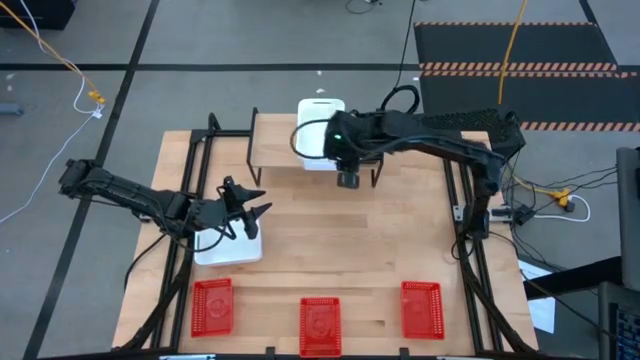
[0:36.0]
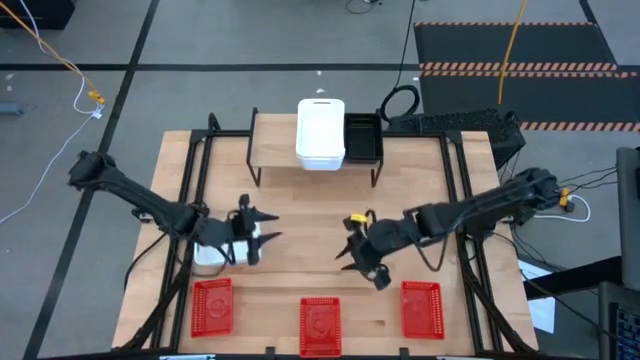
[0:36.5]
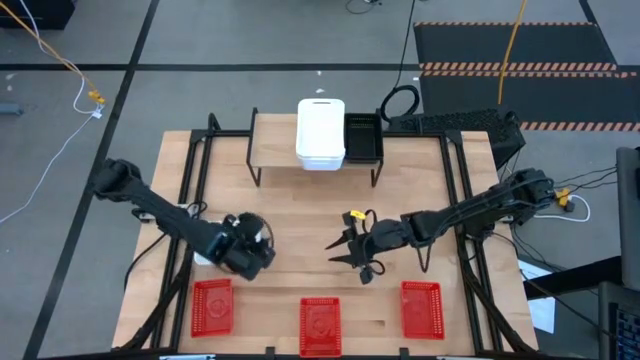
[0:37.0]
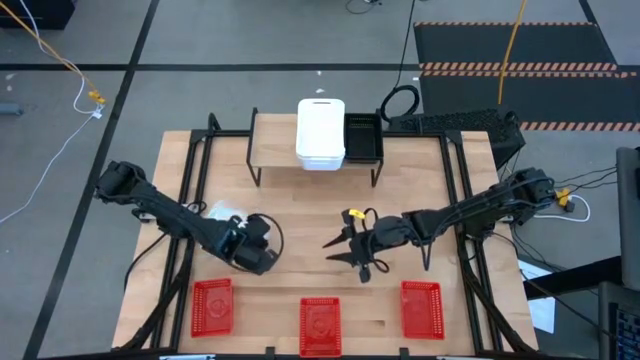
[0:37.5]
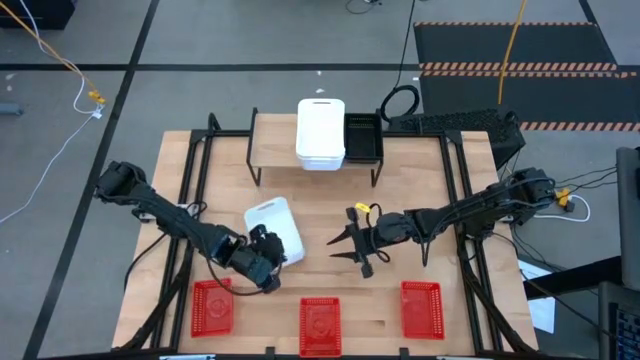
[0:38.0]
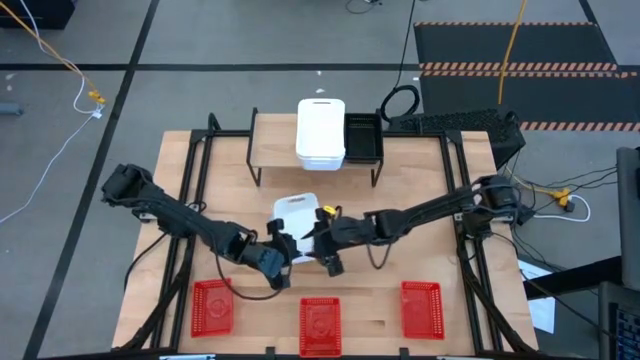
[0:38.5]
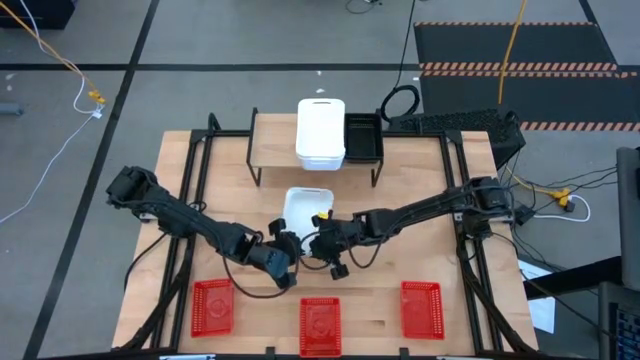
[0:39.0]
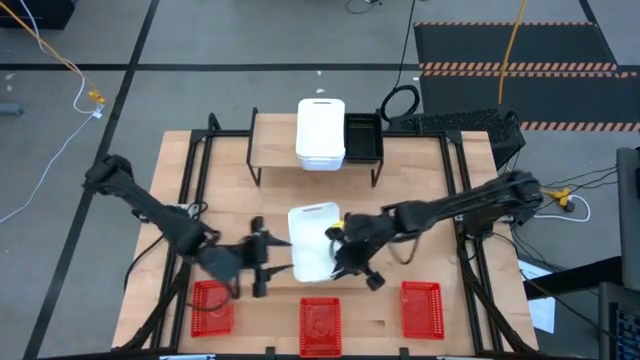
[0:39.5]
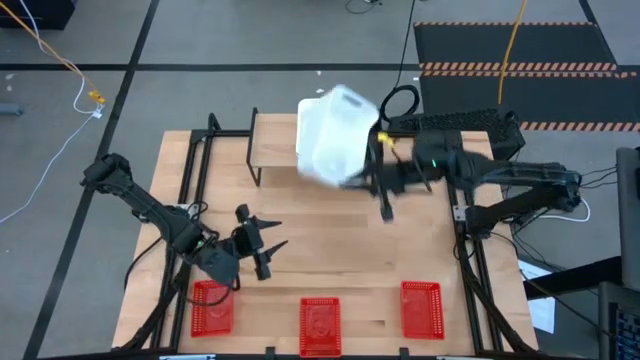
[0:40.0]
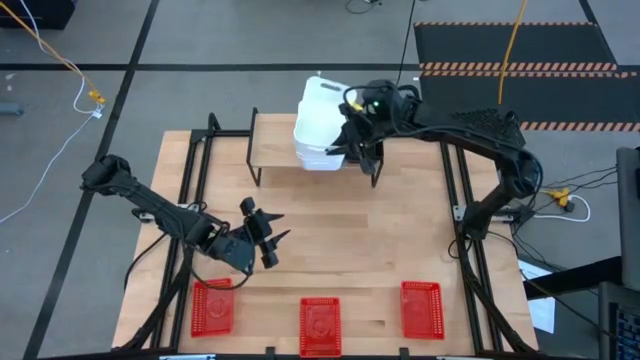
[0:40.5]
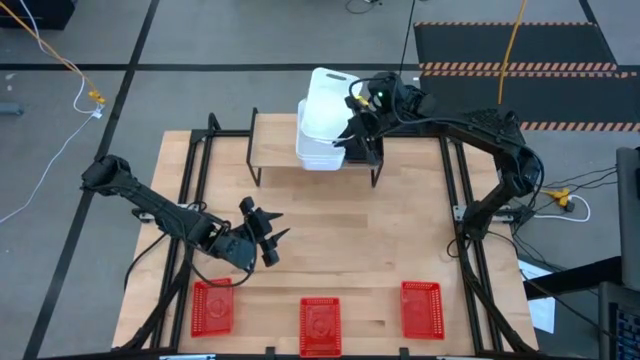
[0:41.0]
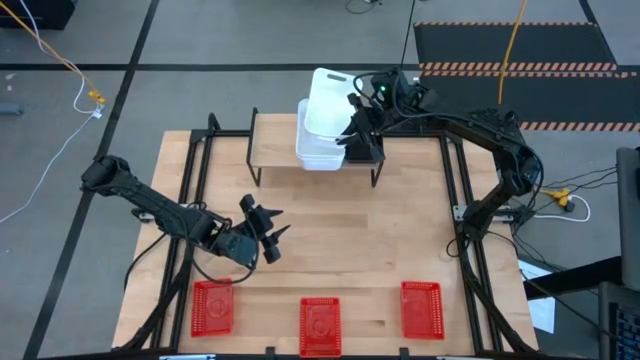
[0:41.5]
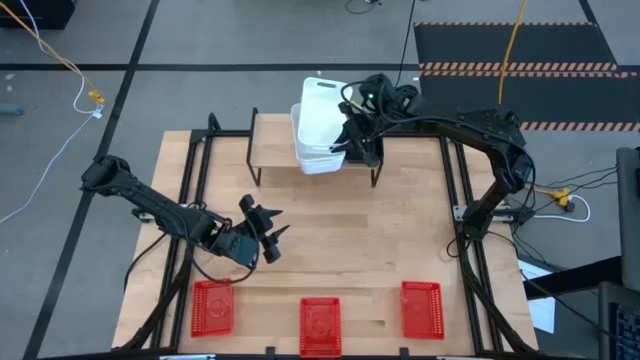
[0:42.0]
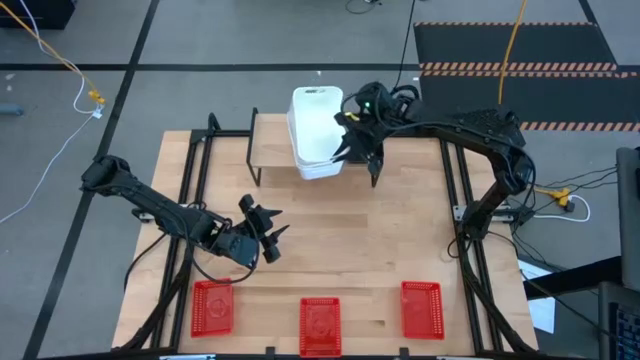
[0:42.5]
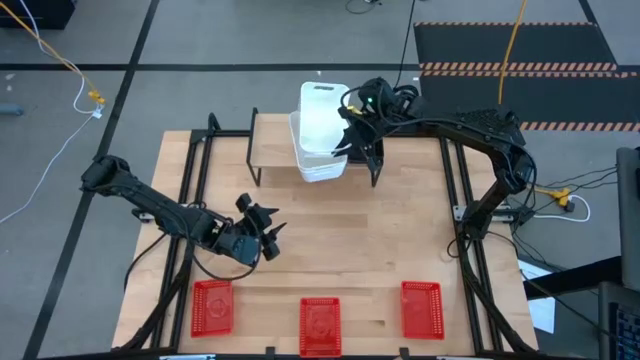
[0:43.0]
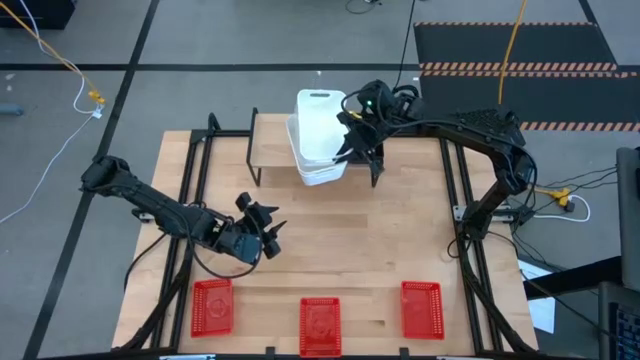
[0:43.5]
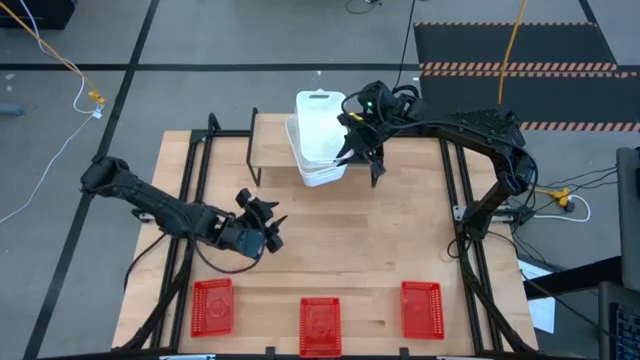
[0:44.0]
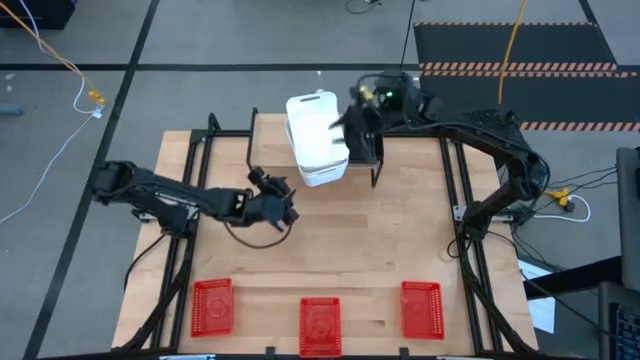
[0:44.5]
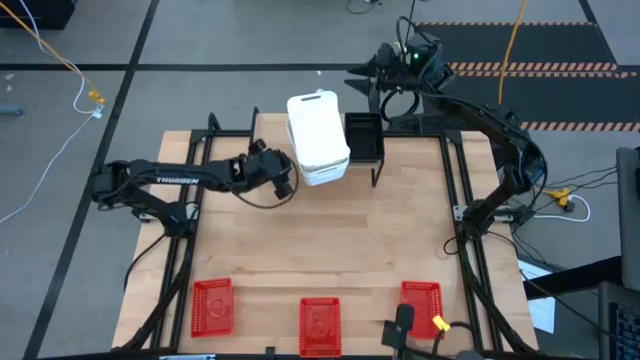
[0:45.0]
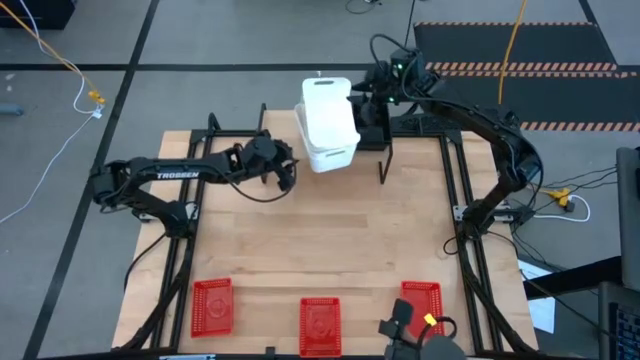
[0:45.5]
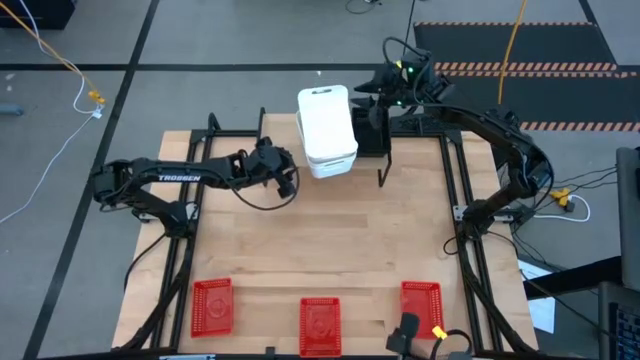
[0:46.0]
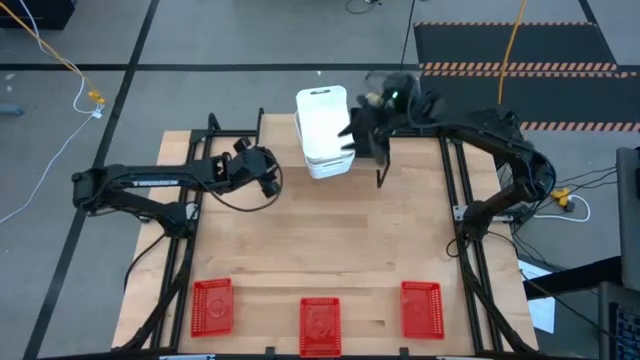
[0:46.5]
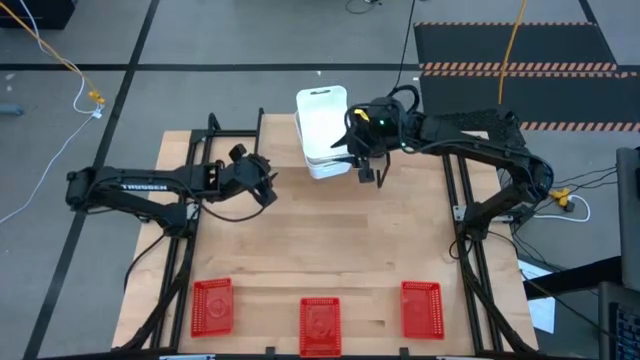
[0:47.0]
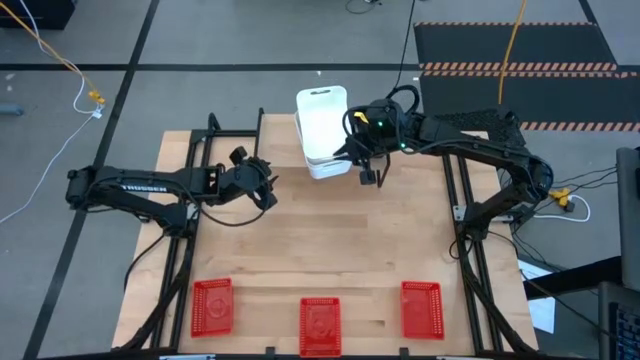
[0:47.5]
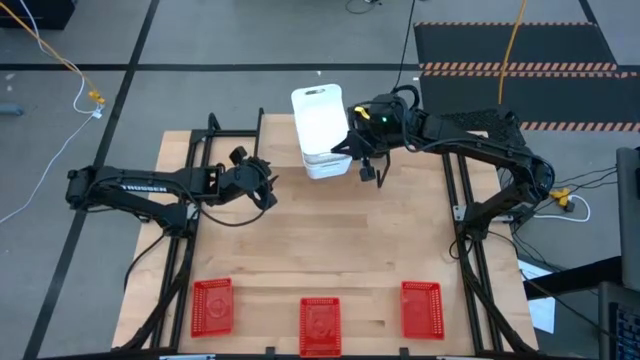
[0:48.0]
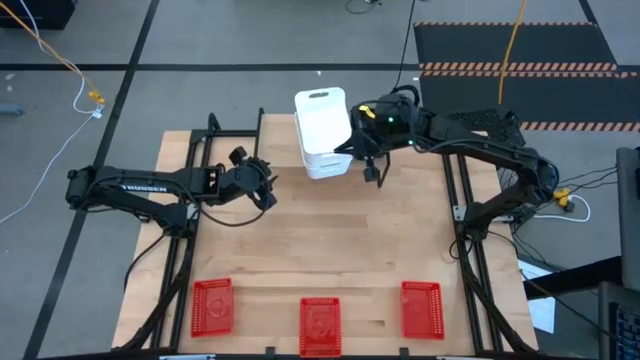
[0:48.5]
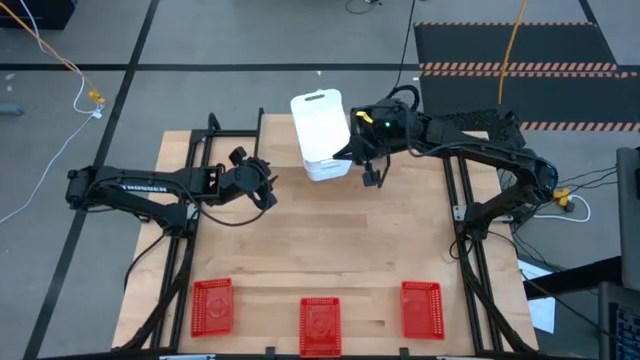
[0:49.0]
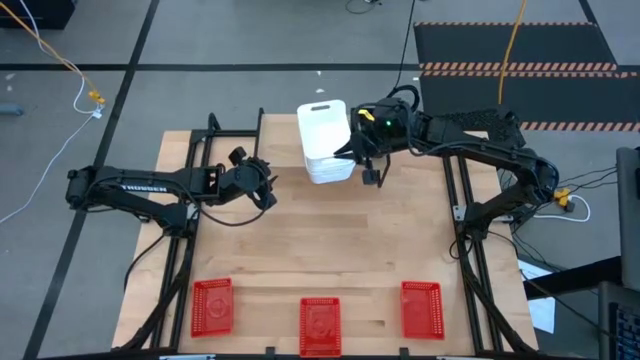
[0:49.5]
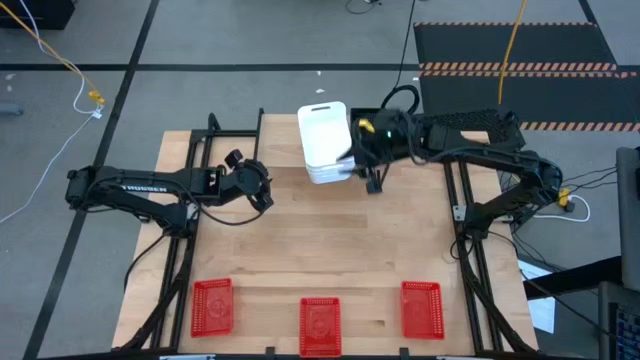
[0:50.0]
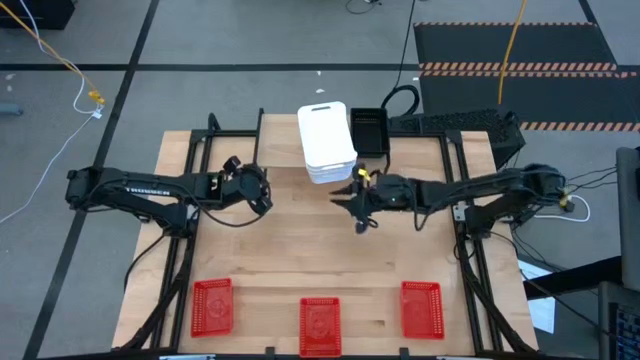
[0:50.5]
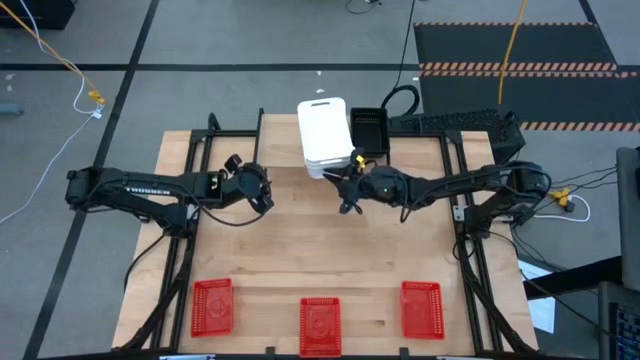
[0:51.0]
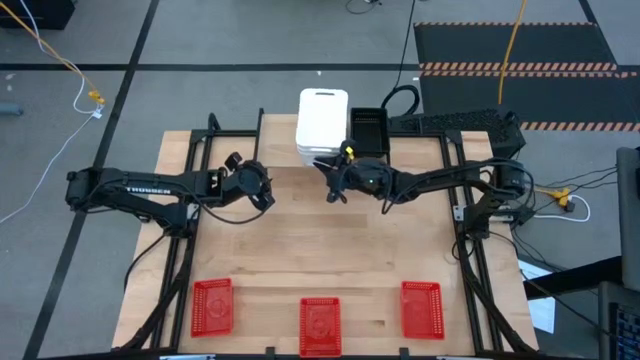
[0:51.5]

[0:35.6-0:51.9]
Task: Stack baskets on shelf by color
Stack the white bin on the stacked white bins on the shelf

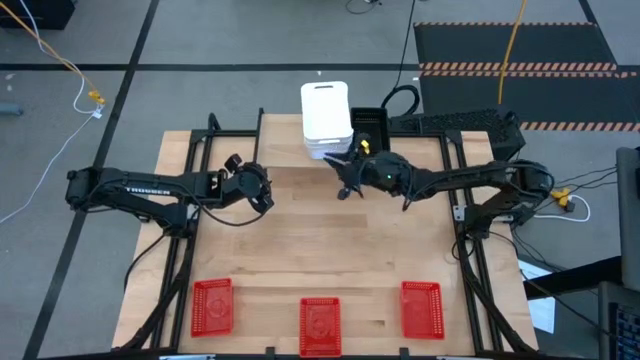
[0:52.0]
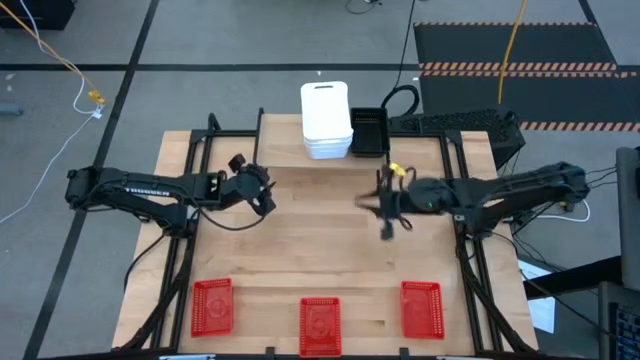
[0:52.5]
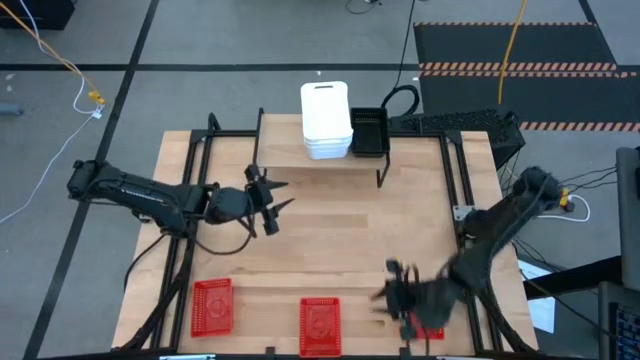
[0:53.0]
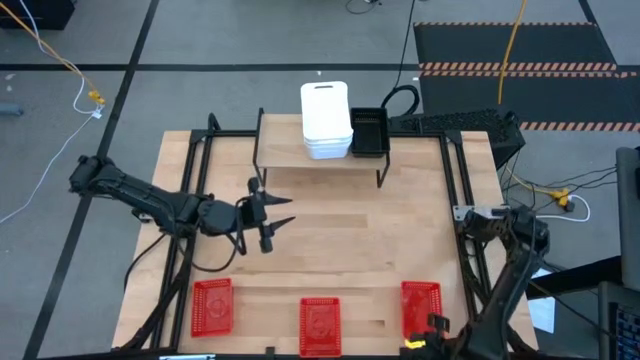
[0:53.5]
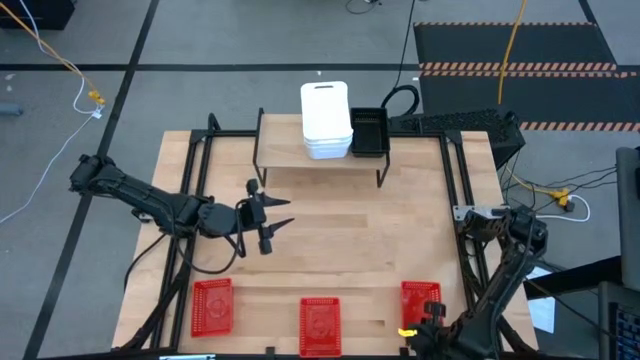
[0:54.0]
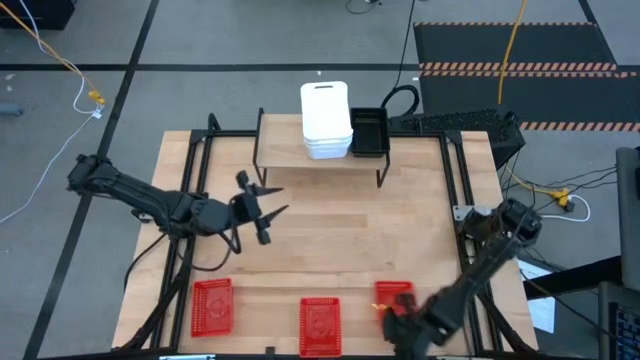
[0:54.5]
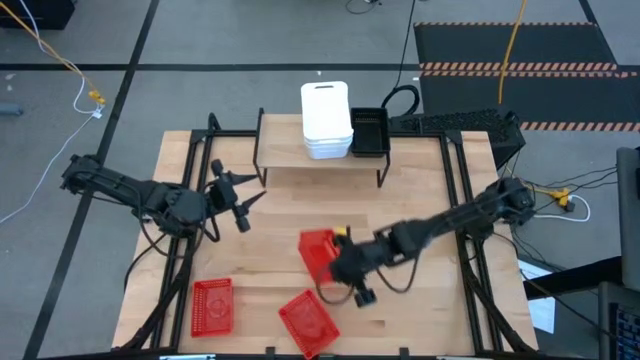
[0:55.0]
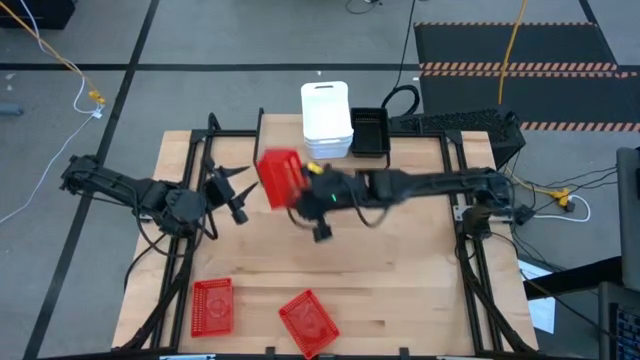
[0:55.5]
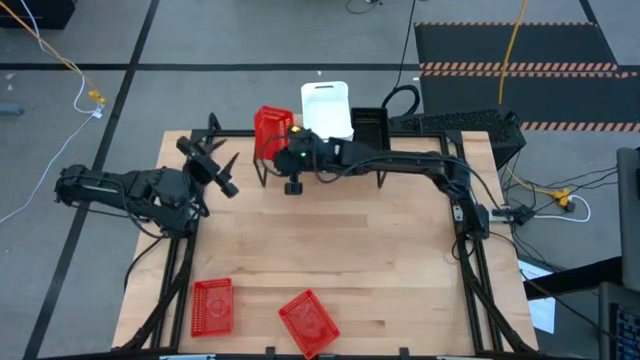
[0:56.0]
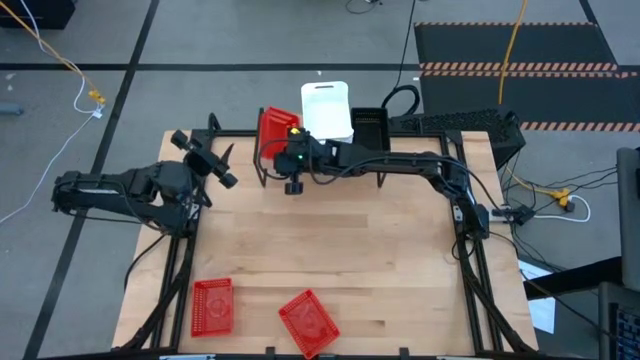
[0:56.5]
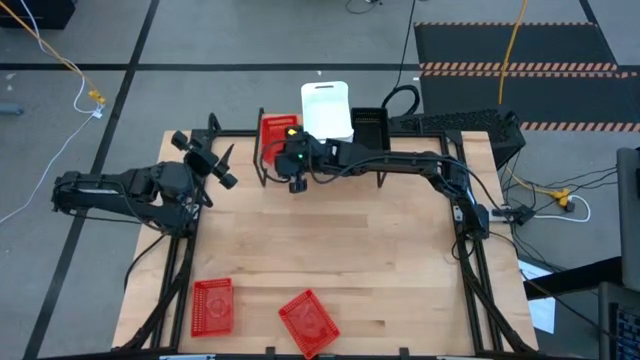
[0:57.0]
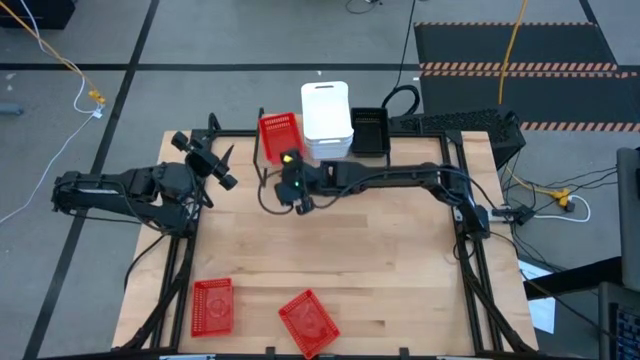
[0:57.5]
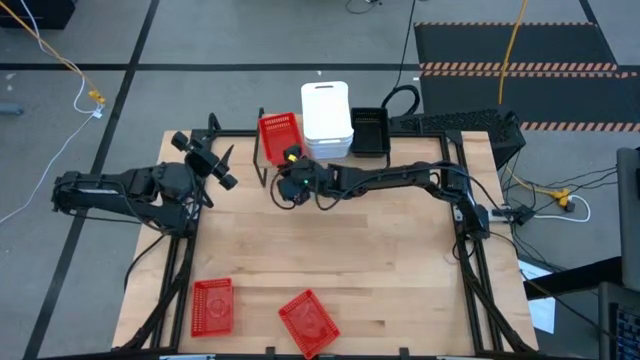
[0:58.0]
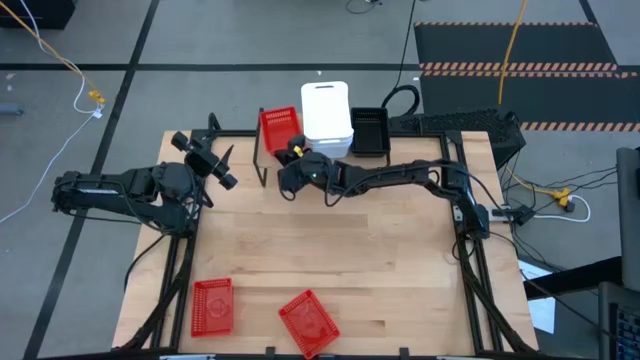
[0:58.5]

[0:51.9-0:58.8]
Put the right red bin on the shelf
